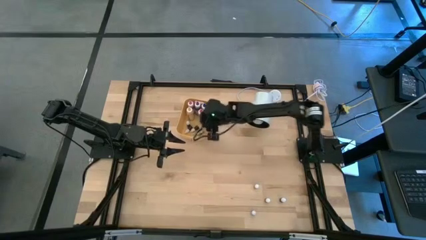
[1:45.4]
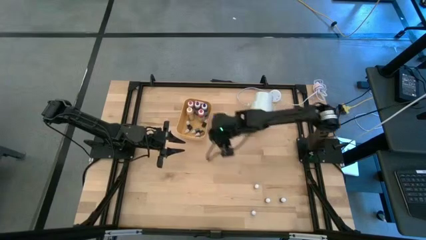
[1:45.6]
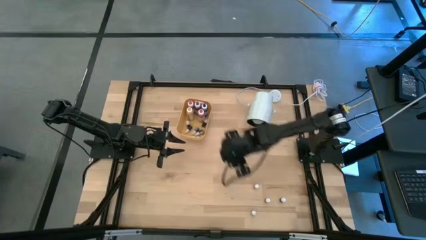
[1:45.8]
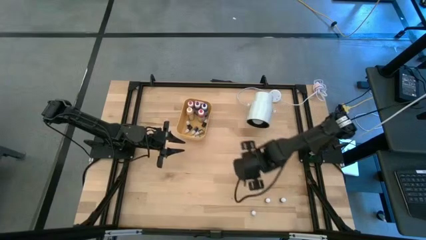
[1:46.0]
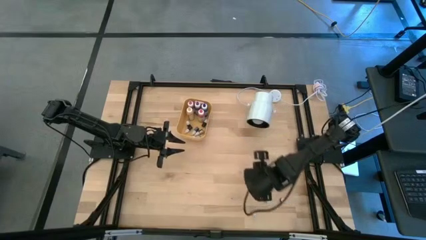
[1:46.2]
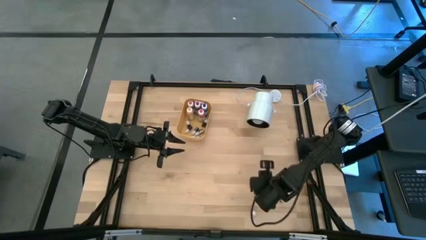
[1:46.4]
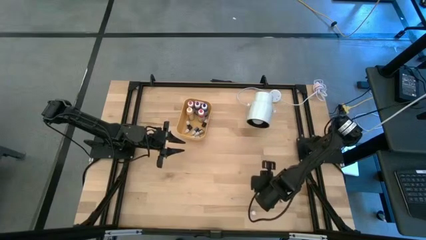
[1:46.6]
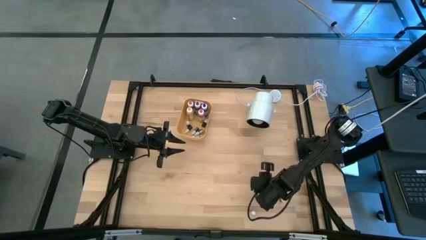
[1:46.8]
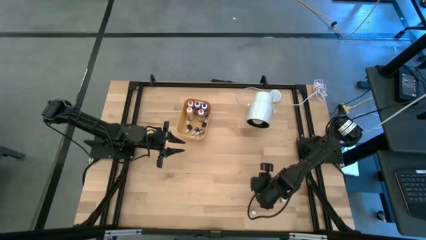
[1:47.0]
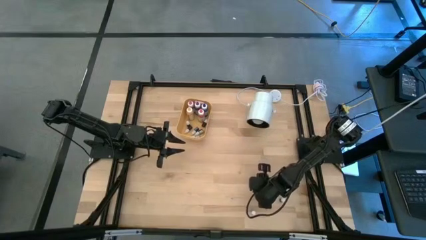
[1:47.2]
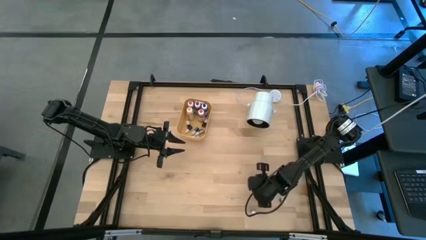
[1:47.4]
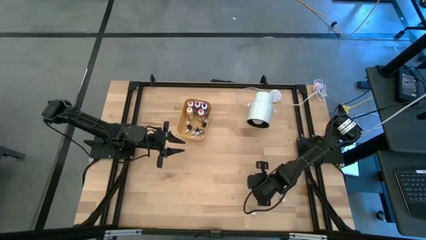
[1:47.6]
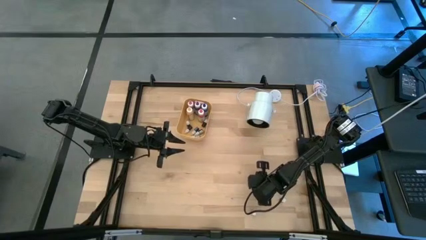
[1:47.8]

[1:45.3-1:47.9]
Task: Pick & Place food coloring
Put the top small pink food coloring bottle into the yellow bin

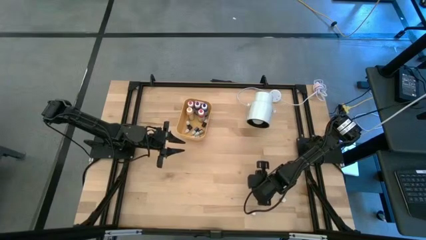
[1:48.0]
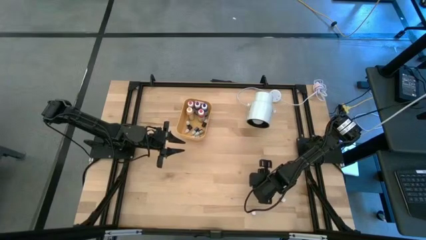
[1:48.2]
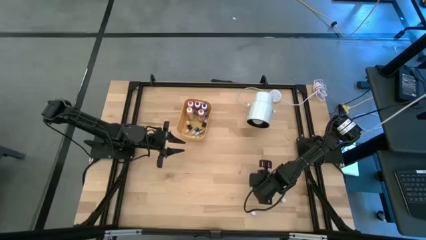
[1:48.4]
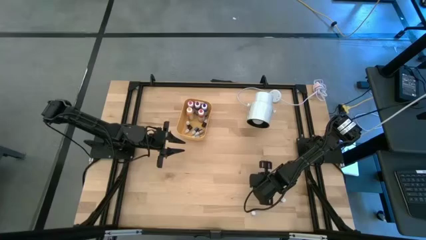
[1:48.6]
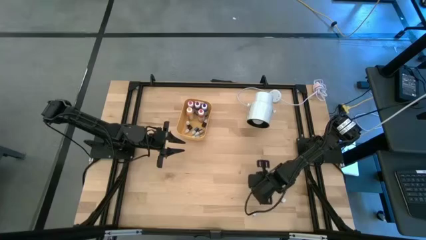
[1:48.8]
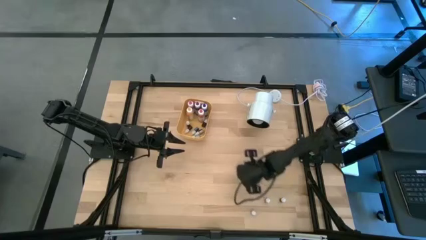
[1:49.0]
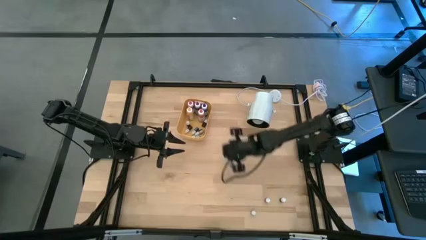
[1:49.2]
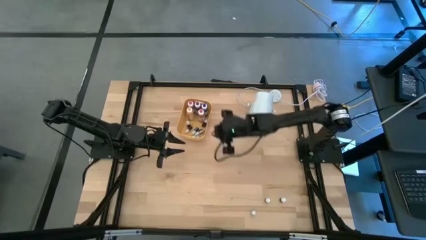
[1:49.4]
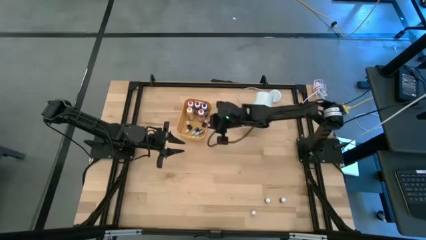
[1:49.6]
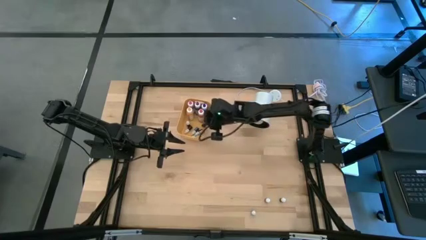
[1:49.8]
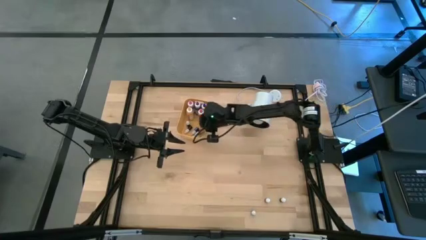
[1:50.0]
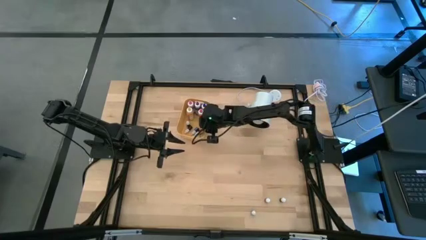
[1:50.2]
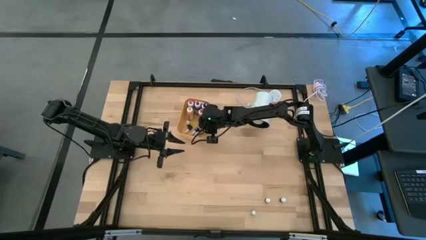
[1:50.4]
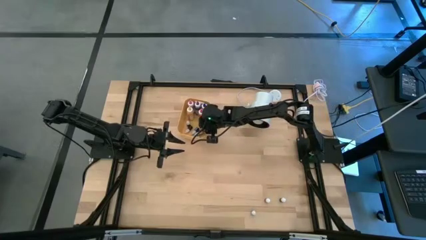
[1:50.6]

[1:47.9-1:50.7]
Put the top small pink food coloring bottle into the yellow bin

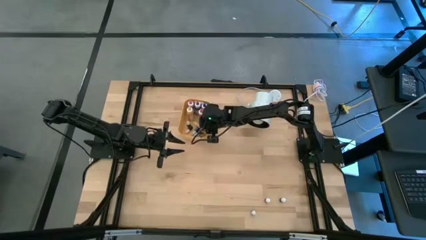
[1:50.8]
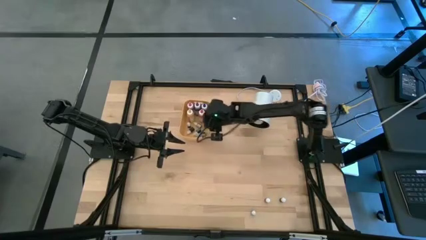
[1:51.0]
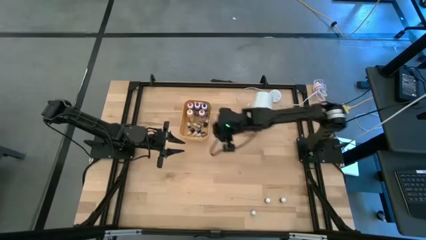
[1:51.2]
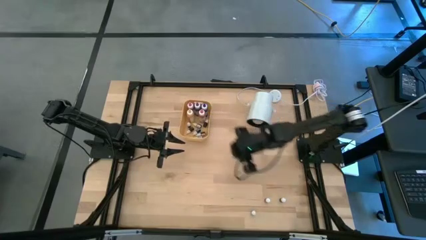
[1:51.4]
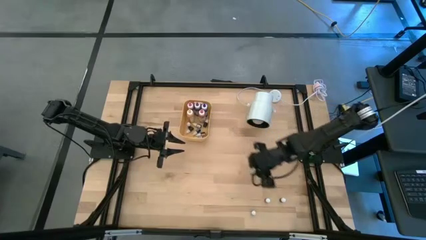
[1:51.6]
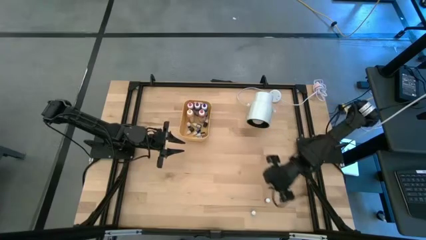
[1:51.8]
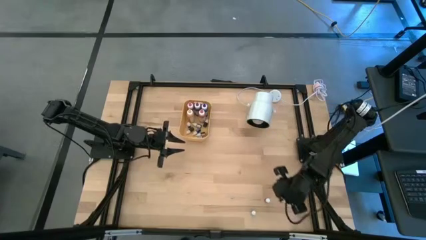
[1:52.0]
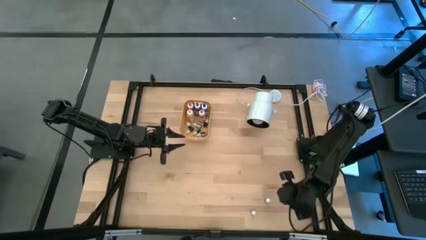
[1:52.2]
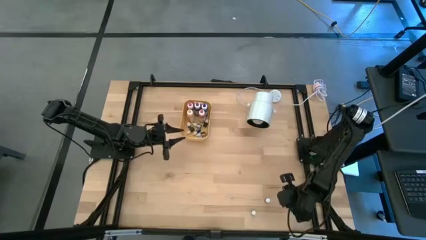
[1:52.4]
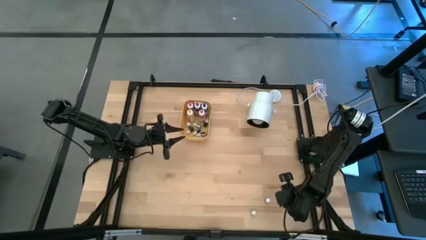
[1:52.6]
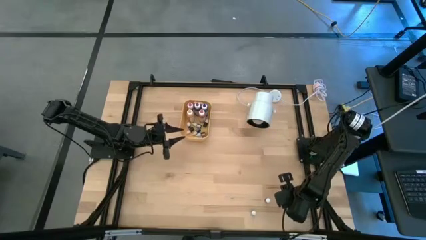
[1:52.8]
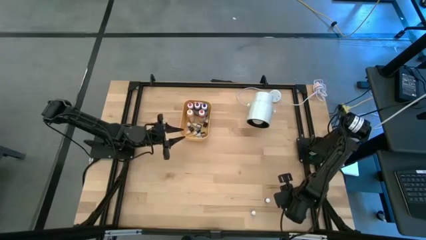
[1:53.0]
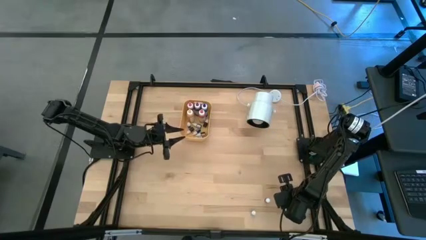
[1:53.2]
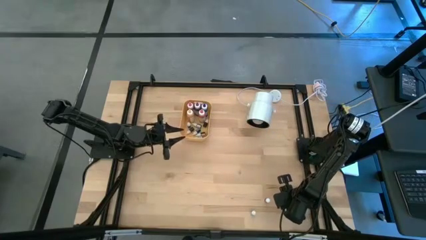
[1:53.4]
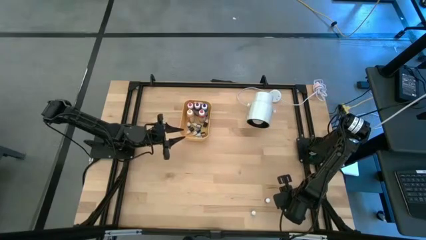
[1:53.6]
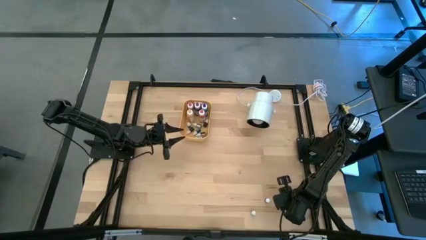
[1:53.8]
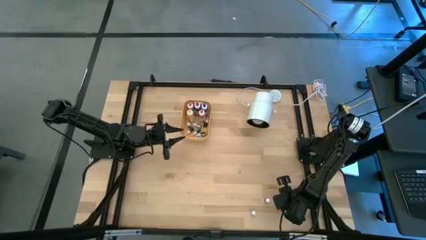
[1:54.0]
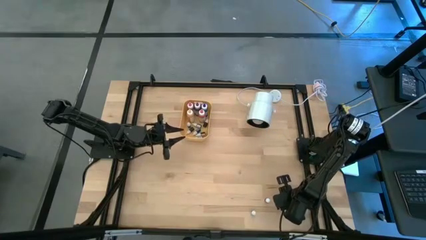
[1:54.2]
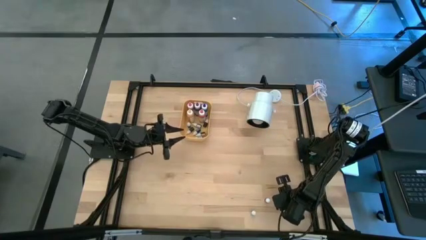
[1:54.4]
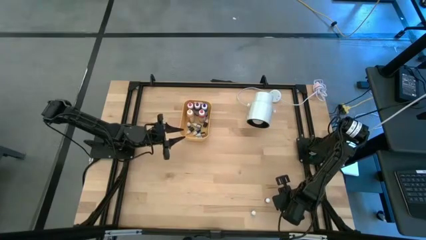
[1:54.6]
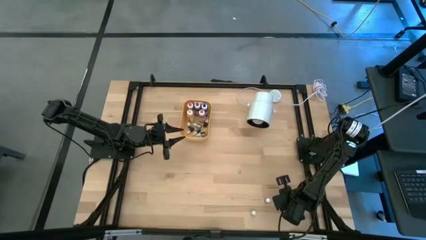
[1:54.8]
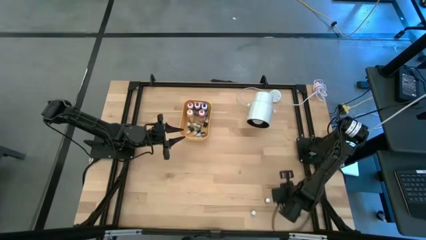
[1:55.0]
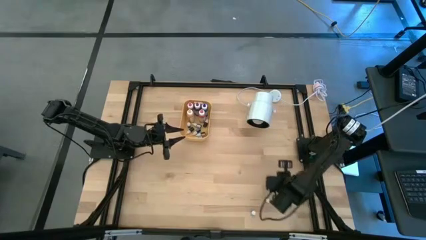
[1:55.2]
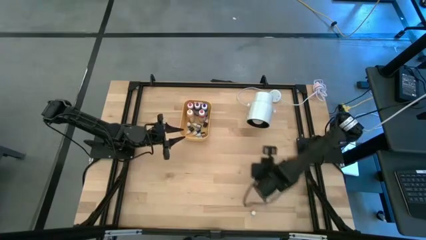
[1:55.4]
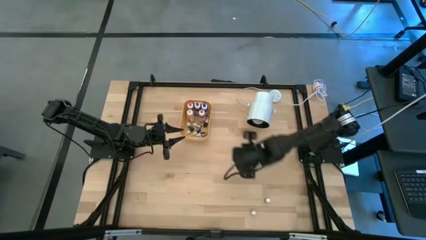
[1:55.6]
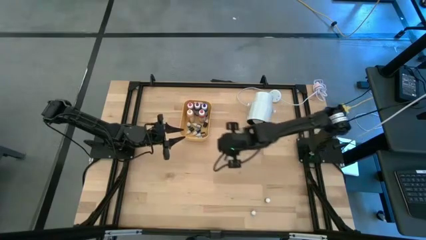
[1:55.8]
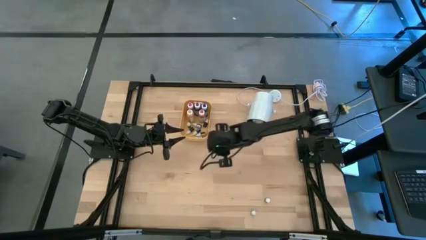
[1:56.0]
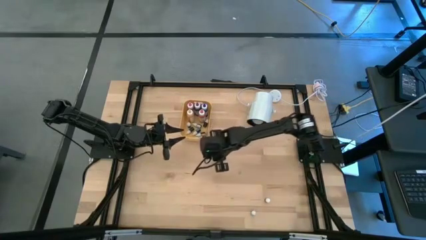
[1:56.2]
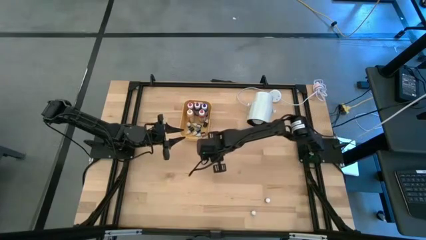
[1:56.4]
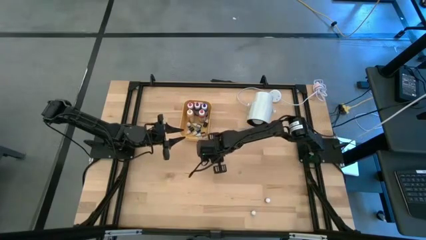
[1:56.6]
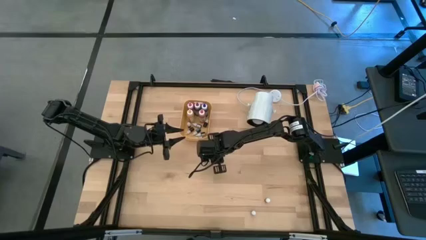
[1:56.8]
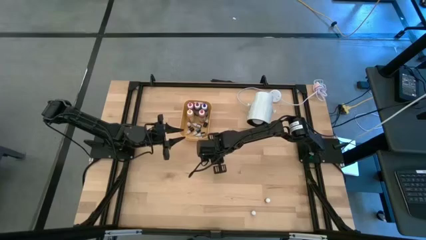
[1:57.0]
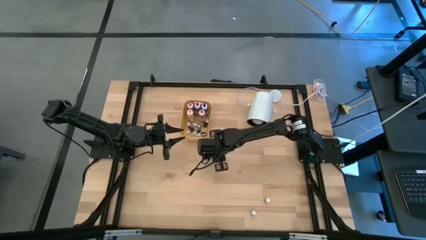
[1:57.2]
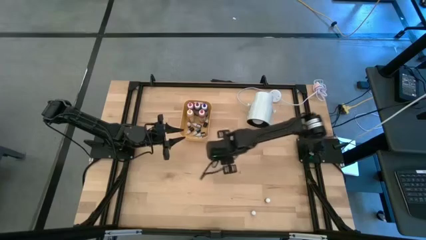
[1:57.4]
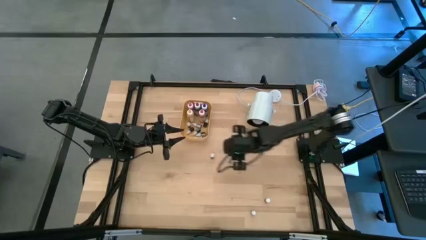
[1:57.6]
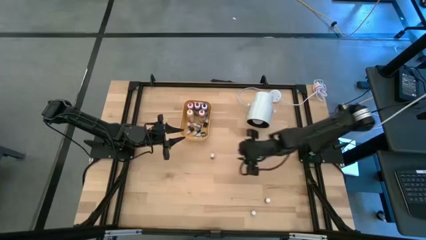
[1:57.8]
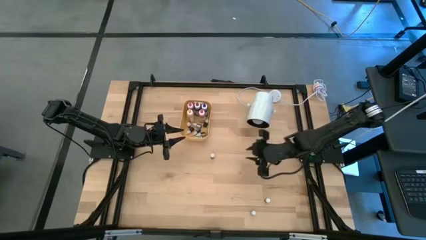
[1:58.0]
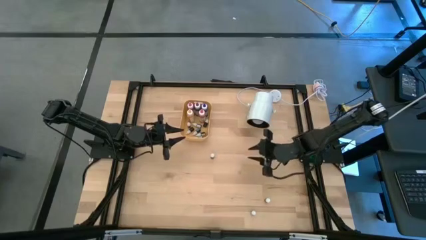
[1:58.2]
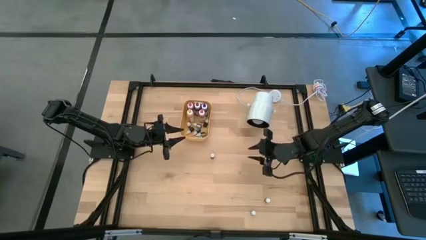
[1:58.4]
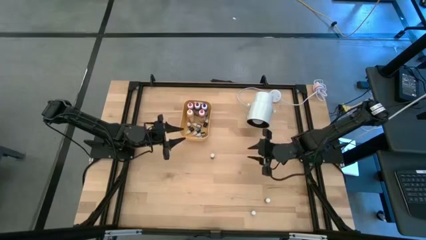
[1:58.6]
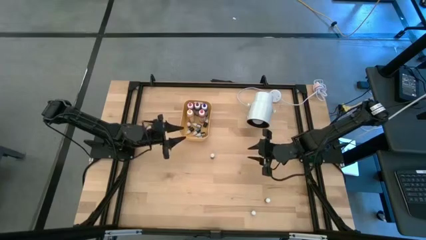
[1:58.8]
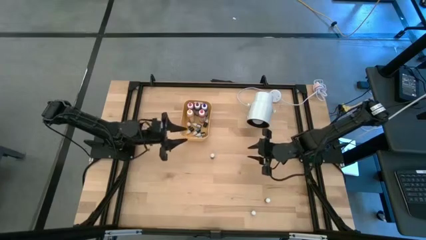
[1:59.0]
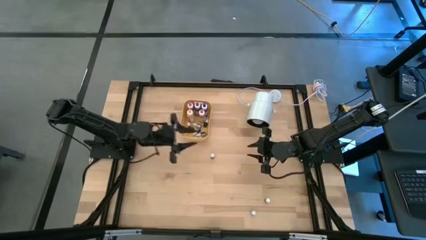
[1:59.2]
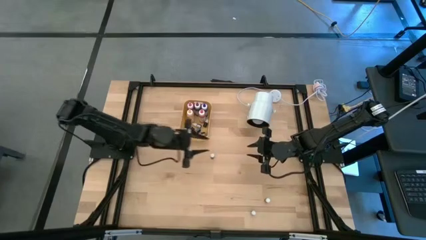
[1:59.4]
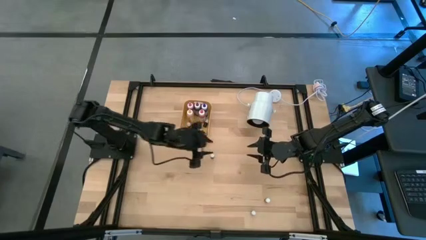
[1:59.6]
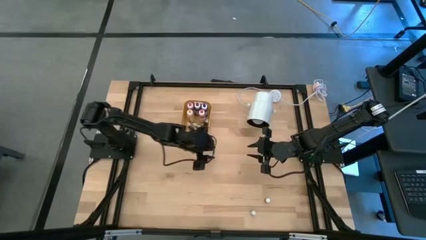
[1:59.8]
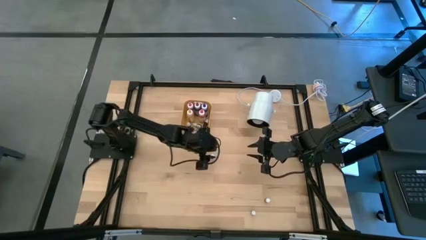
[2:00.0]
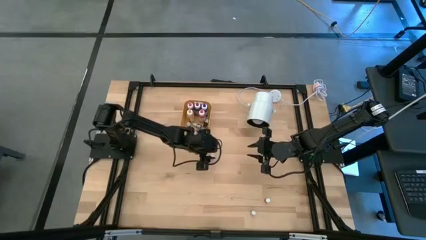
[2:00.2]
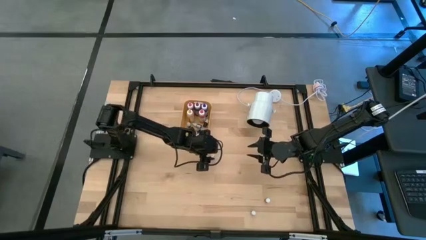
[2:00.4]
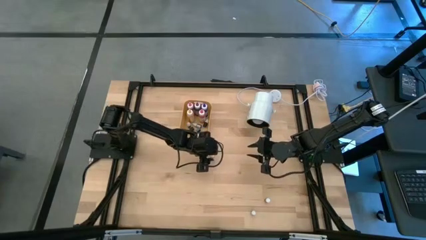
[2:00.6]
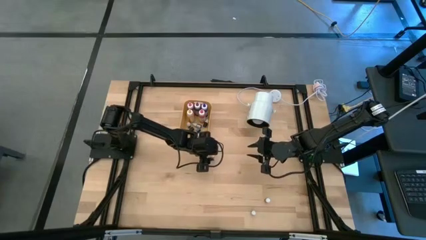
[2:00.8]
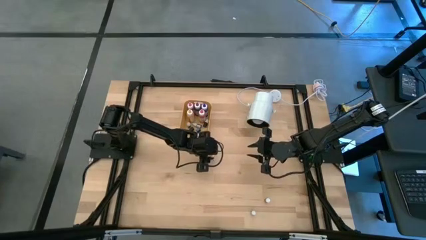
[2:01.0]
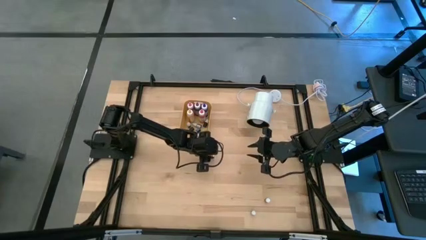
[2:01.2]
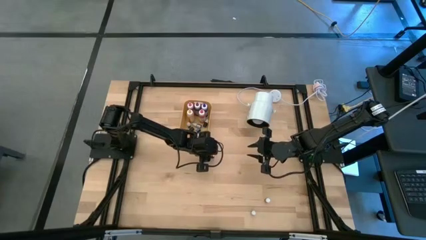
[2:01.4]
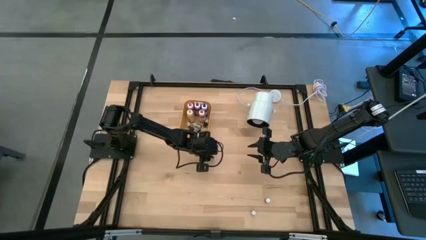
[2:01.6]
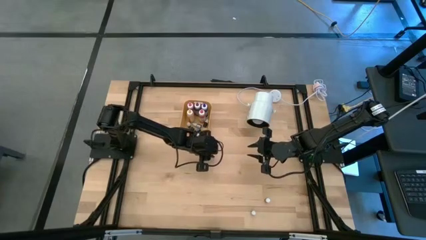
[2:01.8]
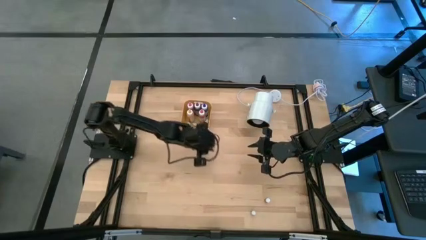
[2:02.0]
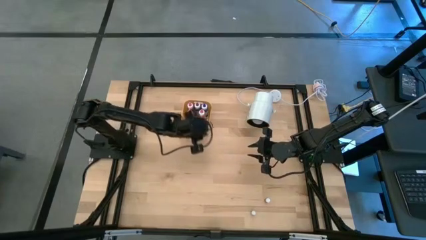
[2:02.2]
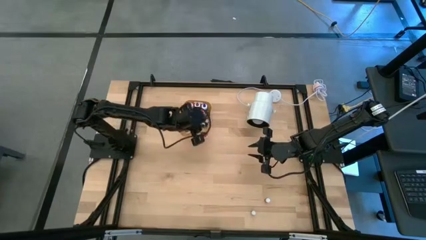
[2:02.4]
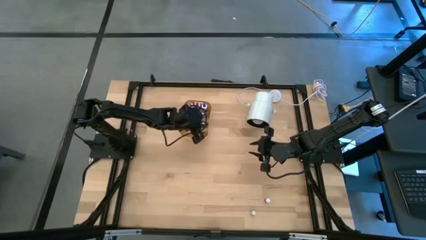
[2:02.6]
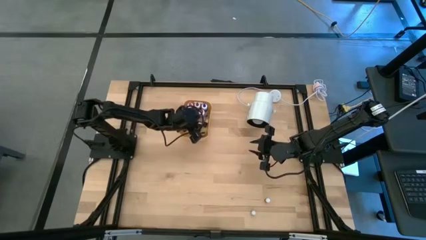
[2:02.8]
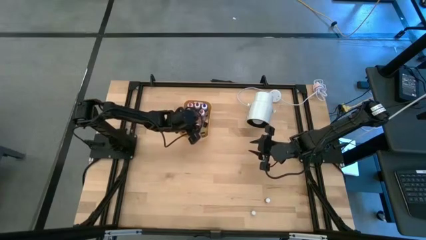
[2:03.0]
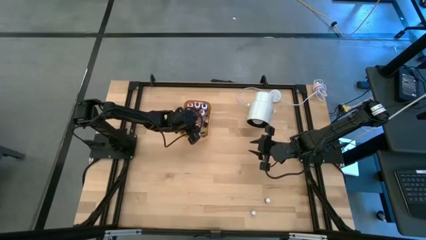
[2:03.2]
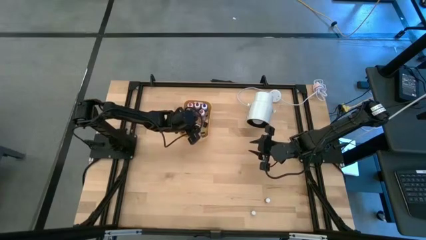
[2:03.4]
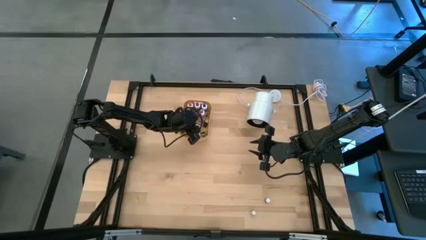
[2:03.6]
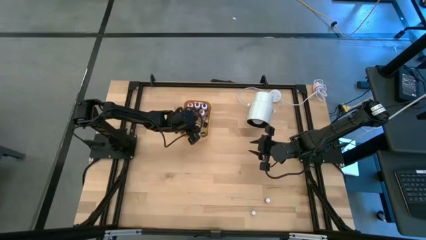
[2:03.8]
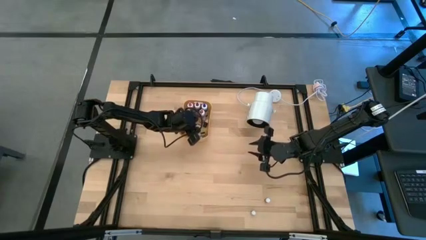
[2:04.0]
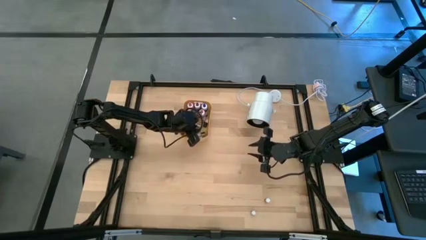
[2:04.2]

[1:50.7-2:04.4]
Put the top small red food coloring bottle into the yellow bin
